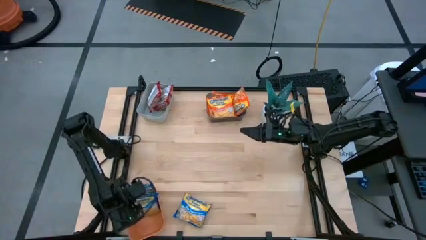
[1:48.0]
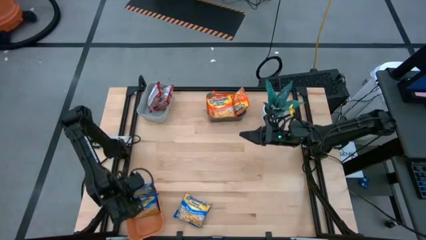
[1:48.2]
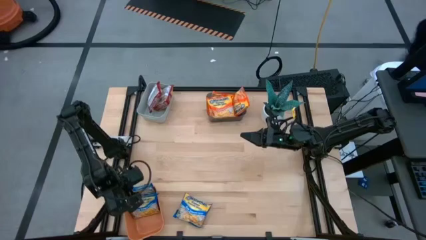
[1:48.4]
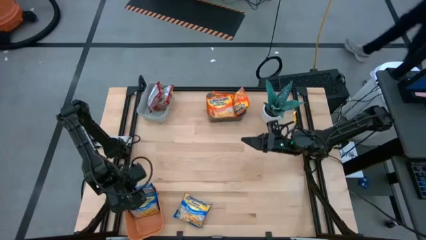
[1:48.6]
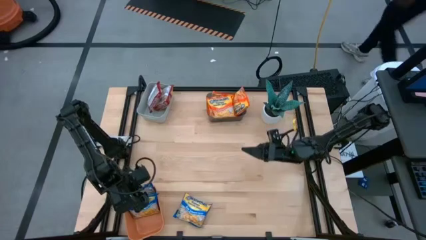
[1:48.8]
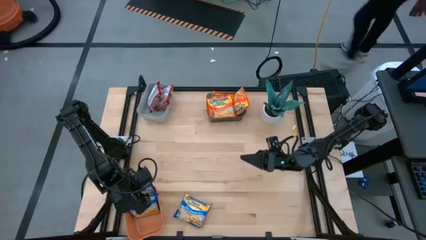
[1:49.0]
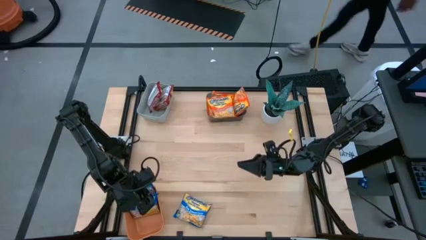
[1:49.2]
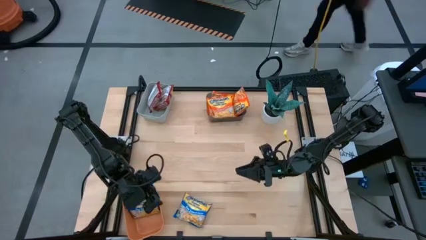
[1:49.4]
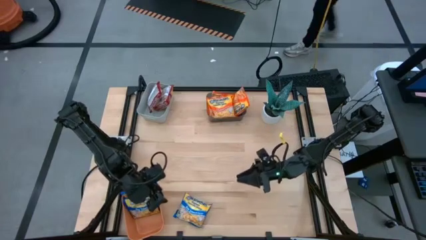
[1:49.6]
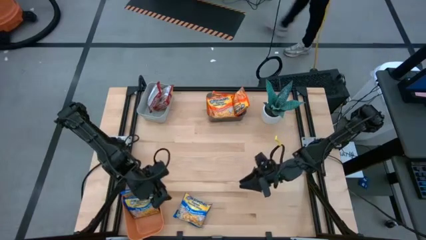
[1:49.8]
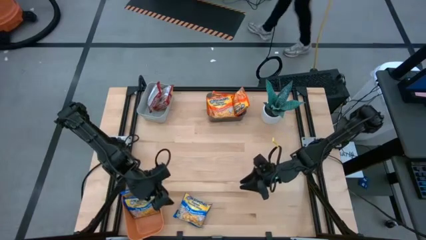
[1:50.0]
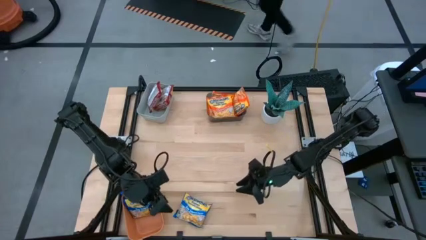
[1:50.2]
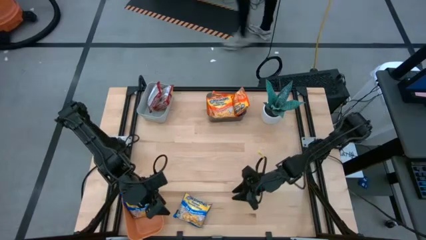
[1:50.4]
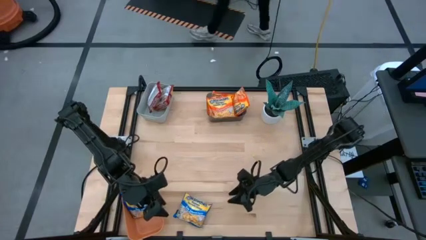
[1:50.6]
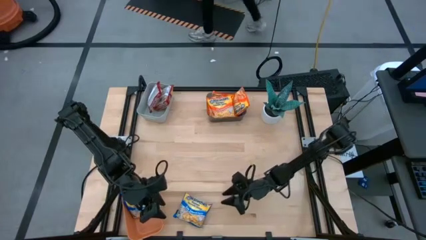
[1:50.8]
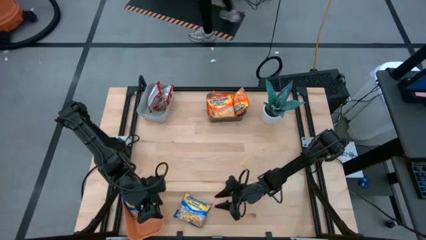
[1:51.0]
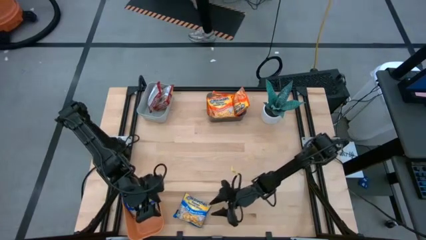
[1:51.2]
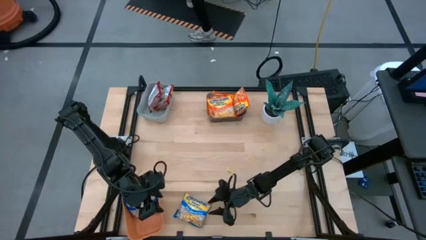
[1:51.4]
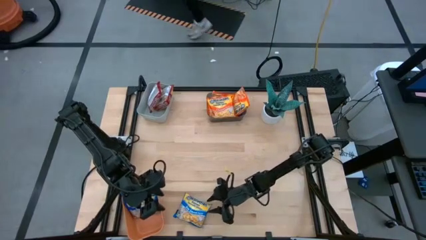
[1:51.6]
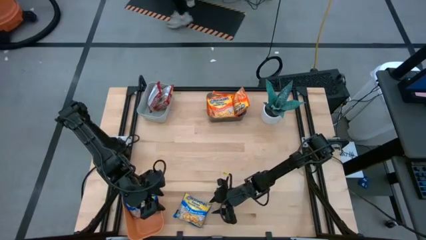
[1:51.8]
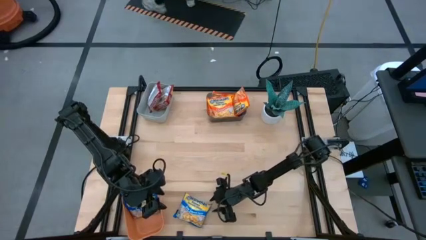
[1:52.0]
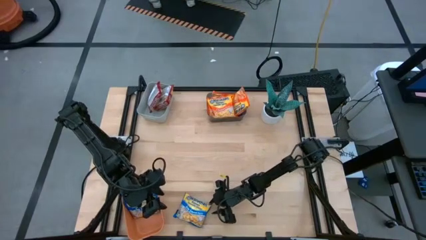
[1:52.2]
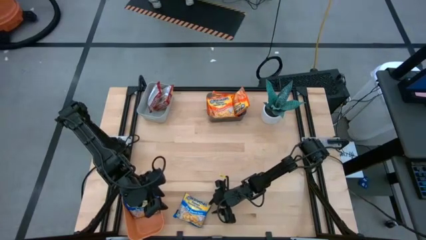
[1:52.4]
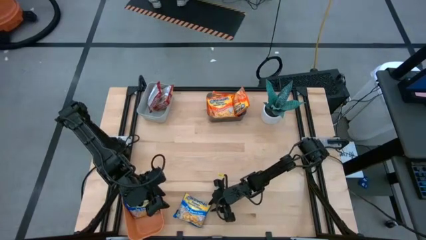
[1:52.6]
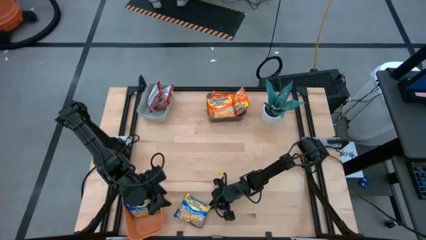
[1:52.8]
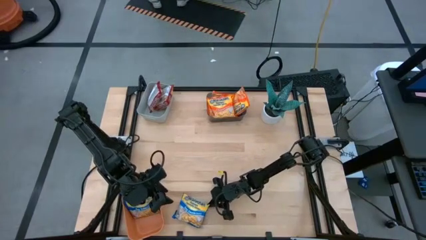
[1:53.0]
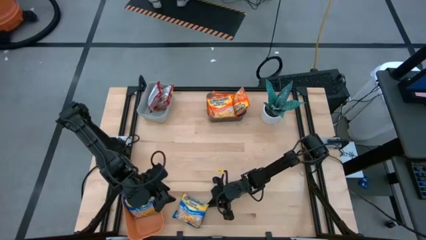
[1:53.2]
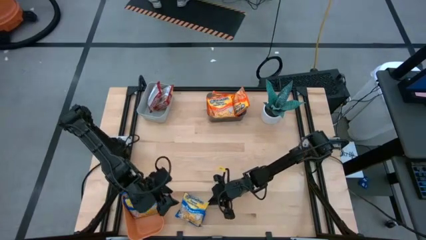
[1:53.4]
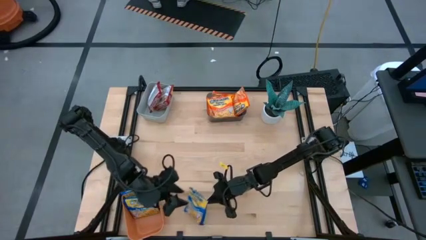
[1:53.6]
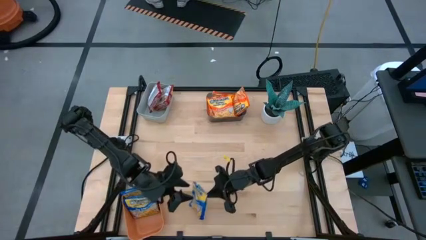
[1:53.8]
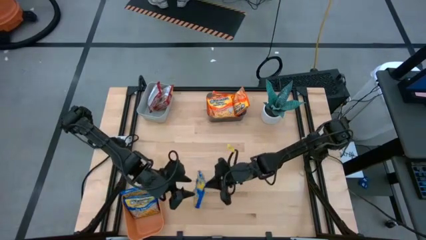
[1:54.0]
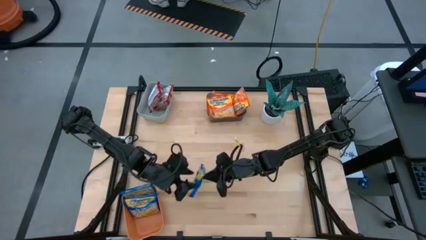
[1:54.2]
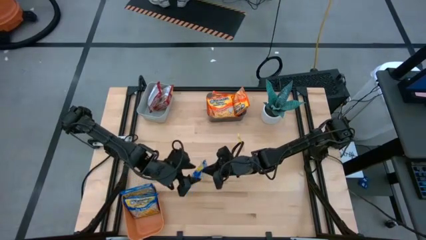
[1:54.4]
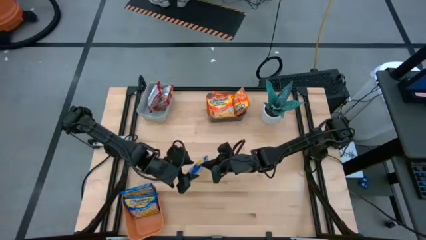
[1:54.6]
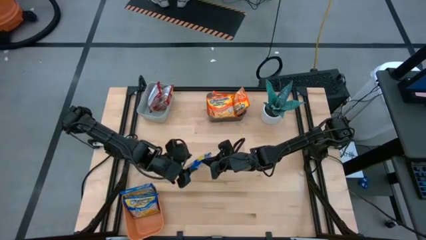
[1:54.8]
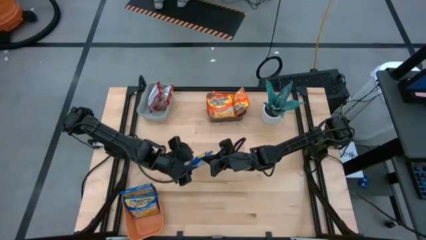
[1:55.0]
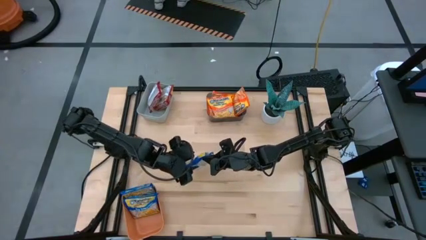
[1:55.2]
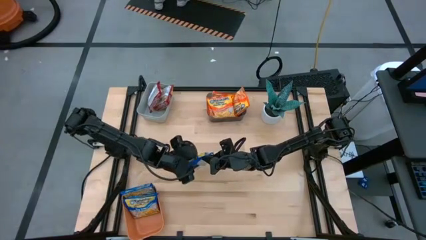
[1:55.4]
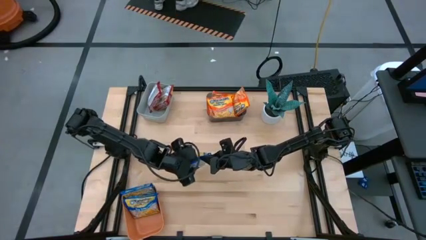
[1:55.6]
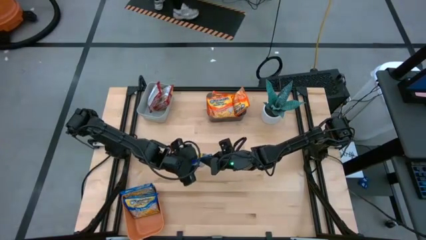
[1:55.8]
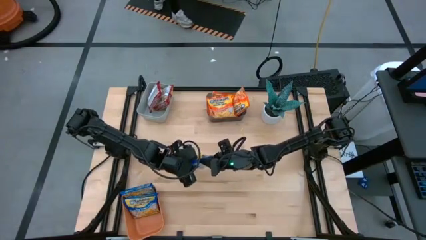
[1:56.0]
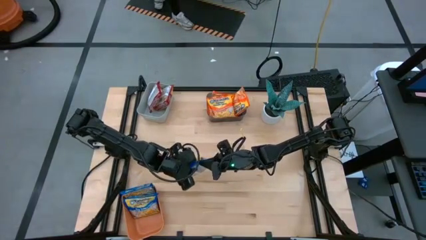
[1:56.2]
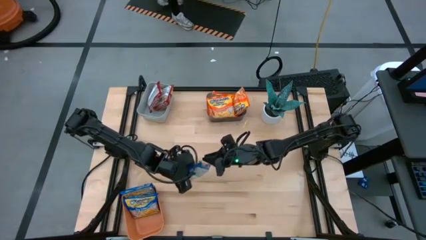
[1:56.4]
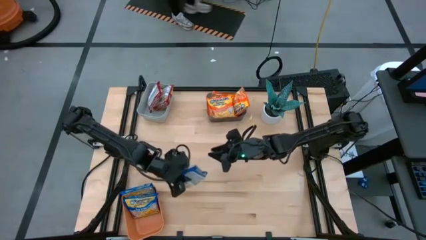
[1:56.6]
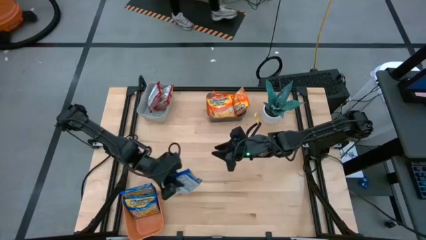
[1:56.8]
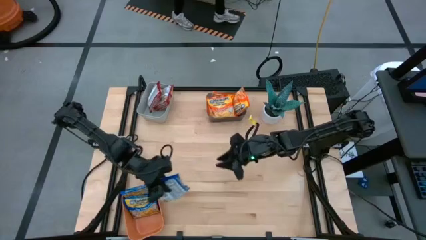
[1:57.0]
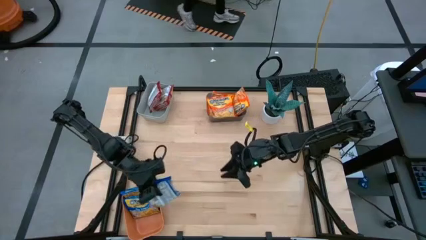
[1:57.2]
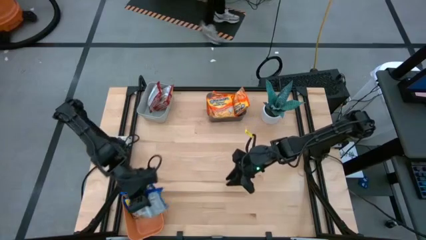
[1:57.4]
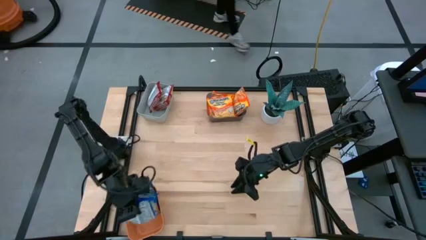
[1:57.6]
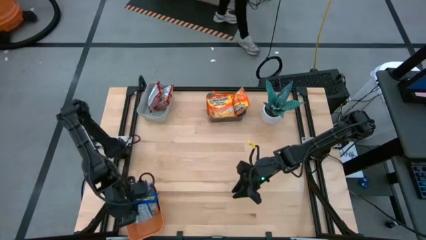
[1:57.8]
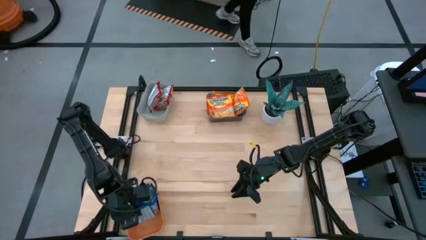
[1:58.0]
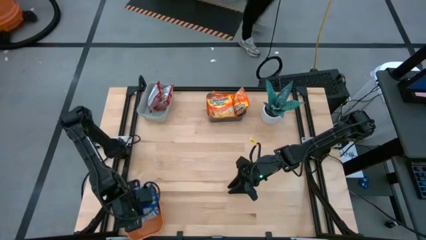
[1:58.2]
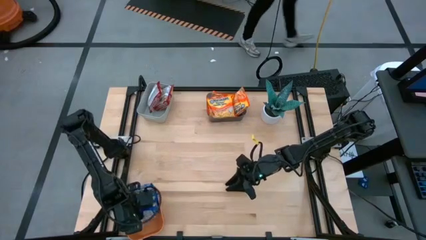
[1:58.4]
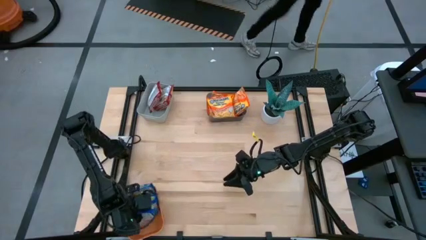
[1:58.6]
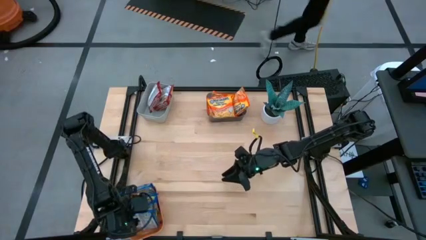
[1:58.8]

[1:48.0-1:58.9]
Task: Sort Maruchan noodles
Put the blue noodle pack into the orange bin

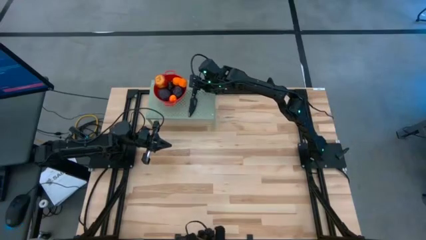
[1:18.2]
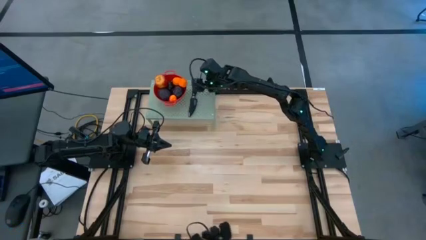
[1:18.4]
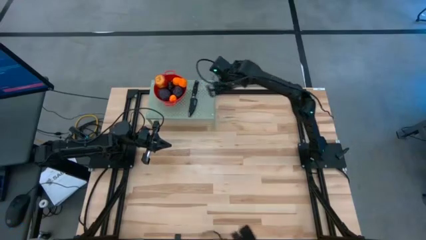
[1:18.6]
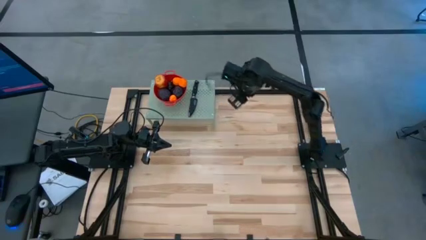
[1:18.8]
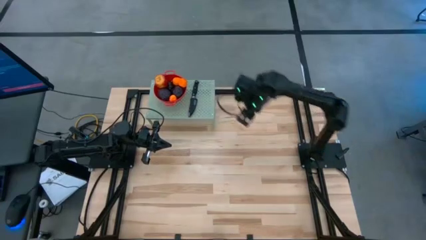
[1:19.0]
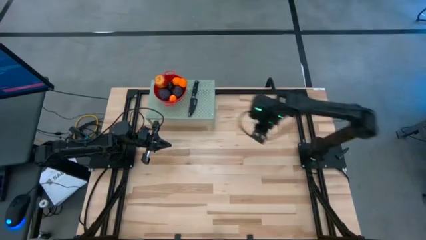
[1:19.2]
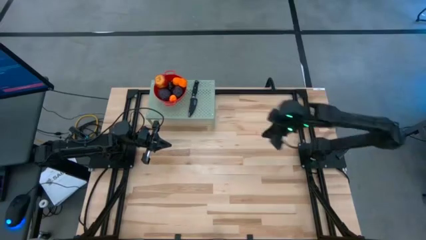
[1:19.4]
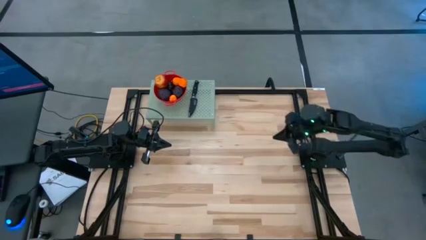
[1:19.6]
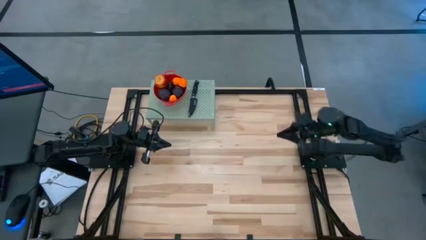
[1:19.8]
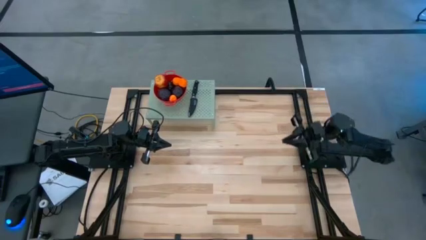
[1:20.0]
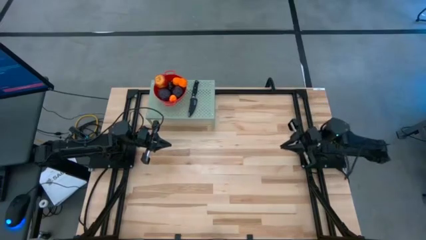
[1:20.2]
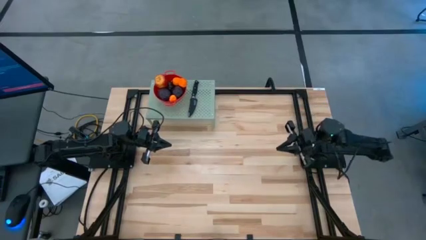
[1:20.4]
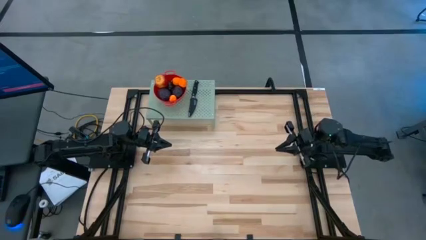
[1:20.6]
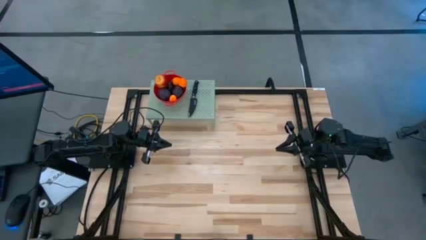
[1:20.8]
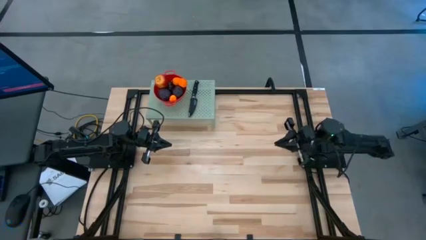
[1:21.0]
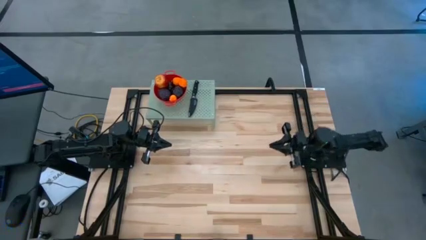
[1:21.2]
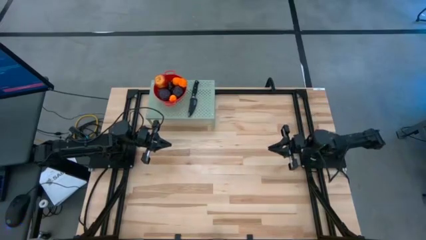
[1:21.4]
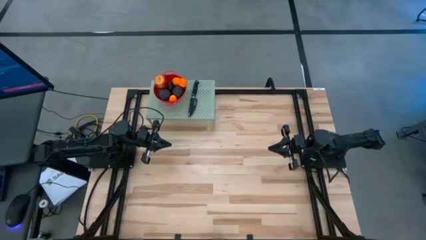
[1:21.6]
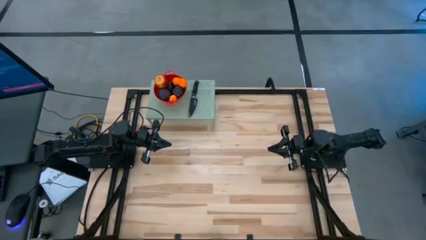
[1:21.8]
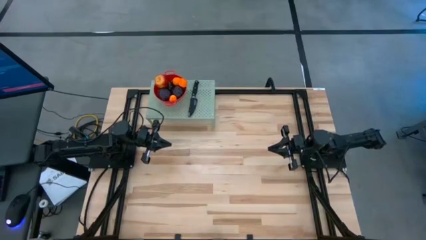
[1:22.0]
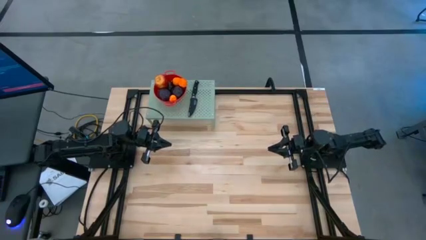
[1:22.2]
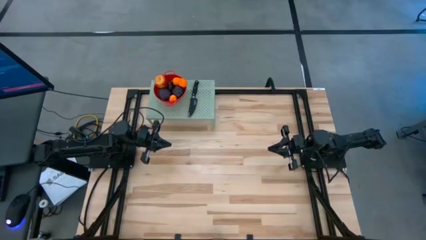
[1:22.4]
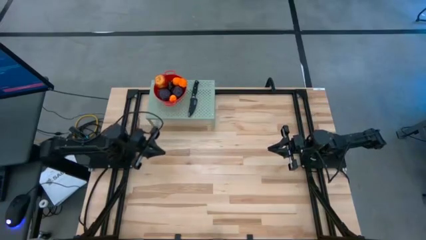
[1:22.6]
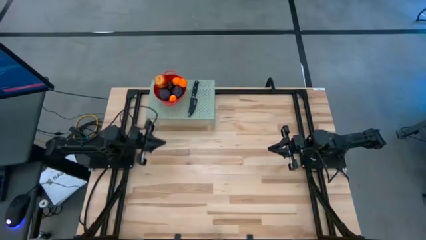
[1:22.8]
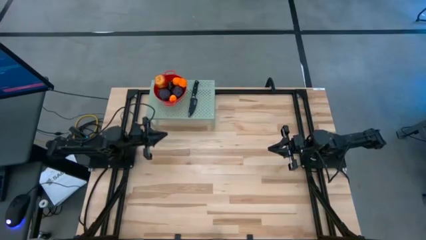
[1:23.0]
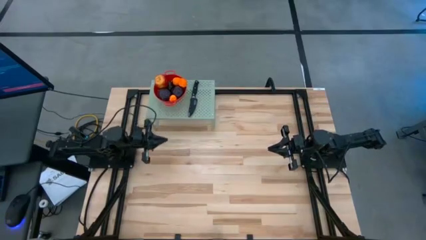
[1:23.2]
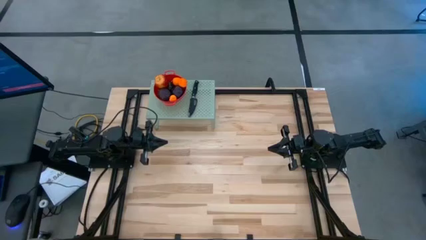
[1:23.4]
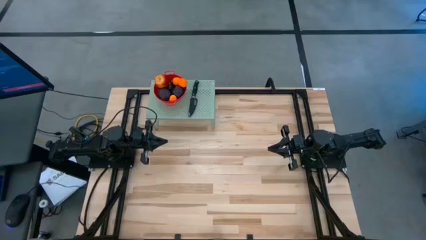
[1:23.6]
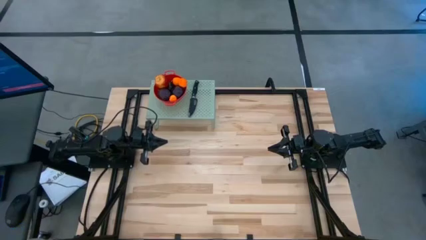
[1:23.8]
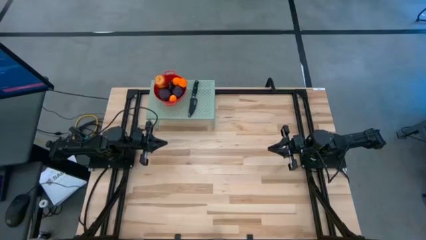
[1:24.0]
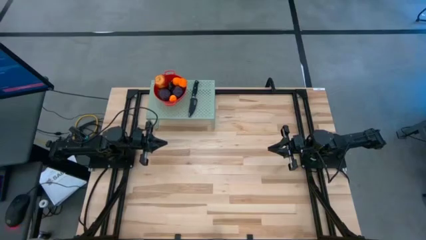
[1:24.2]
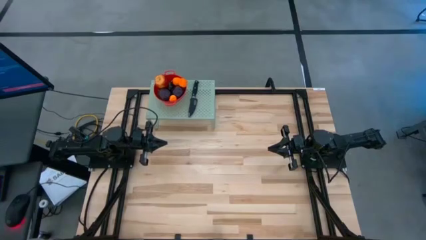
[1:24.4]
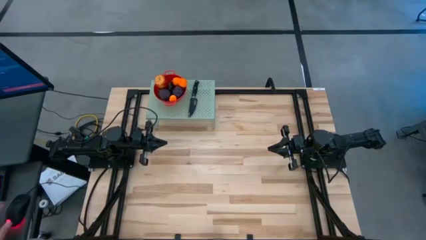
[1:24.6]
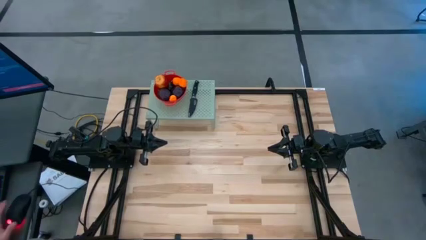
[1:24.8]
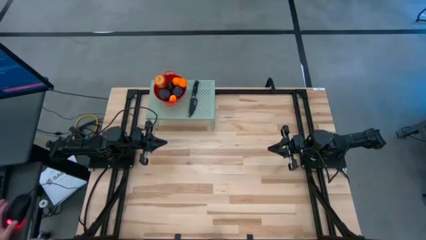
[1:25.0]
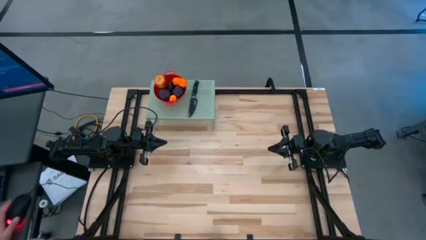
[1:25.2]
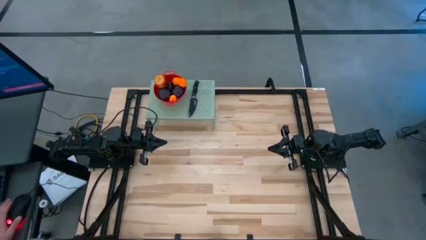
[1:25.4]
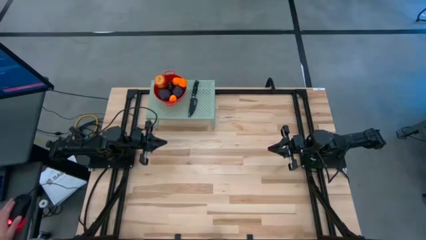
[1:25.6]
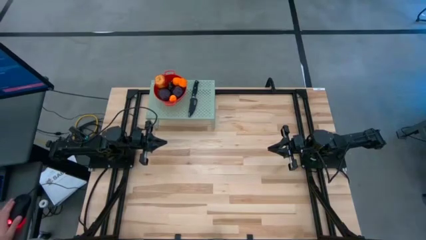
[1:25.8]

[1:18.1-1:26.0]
Task: Pick & Place Fruit
Return to Home Position
